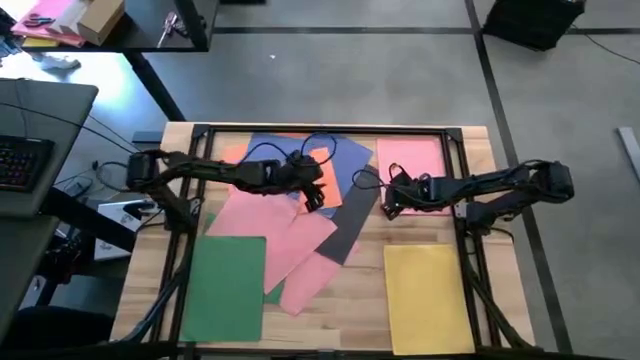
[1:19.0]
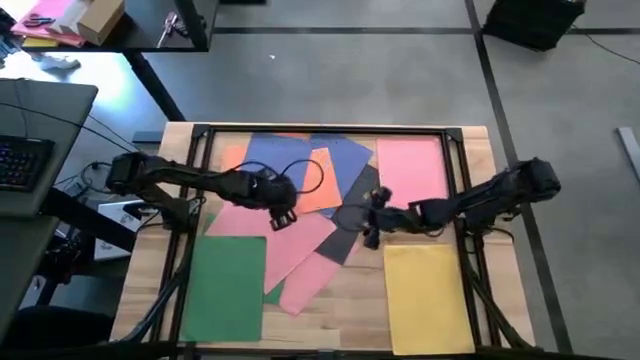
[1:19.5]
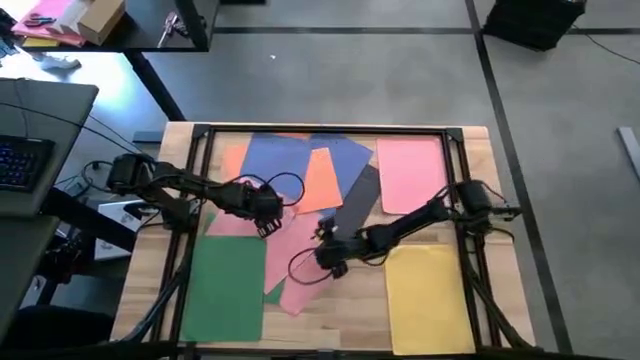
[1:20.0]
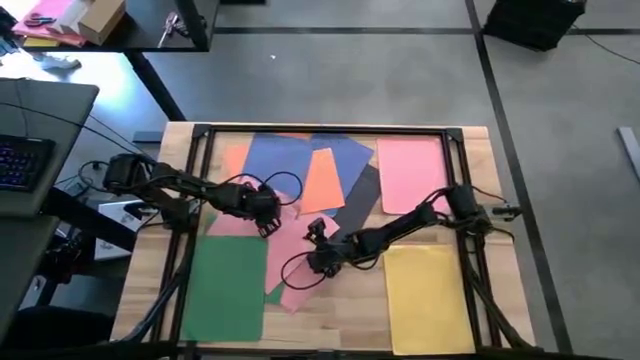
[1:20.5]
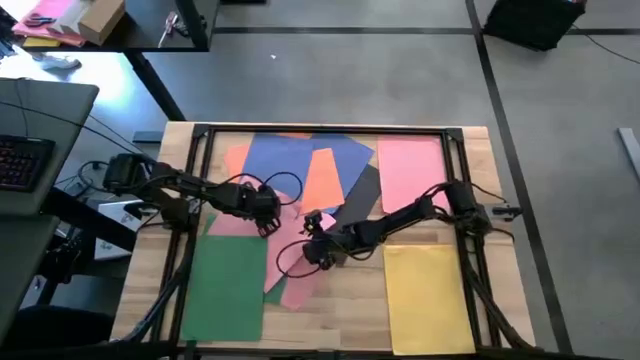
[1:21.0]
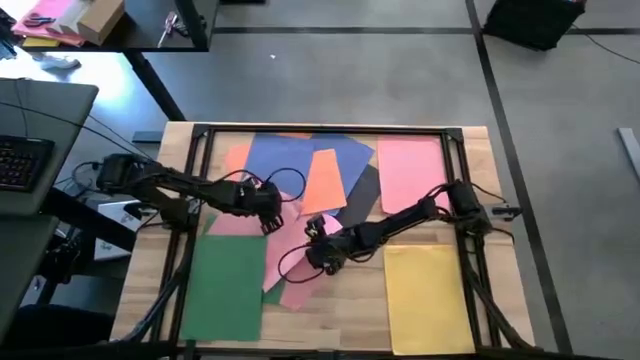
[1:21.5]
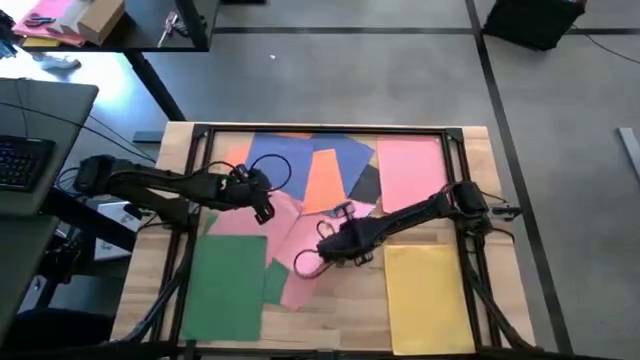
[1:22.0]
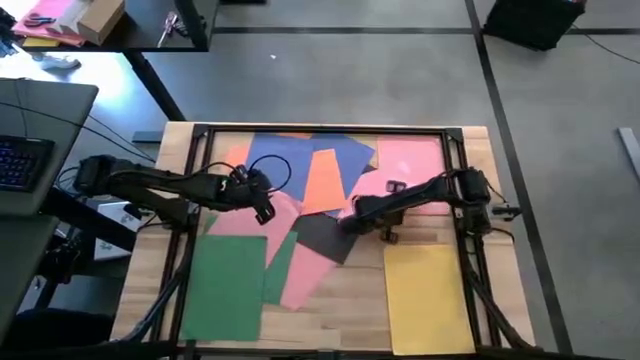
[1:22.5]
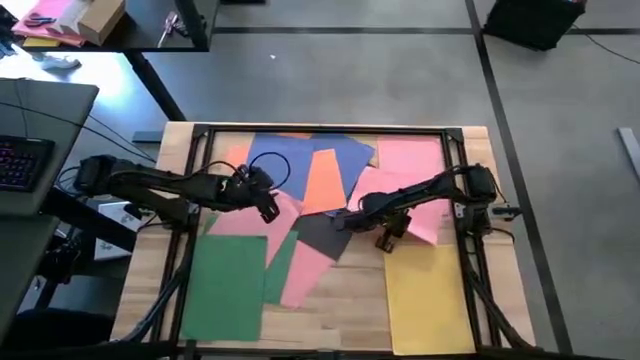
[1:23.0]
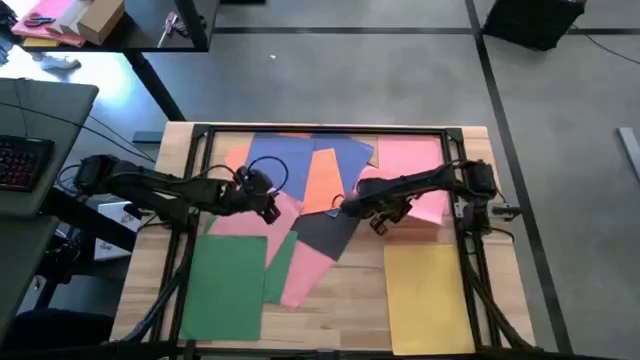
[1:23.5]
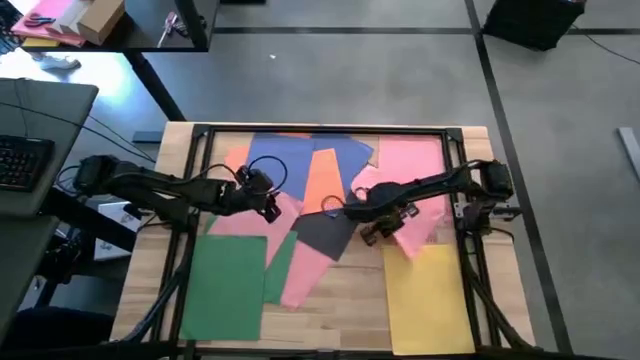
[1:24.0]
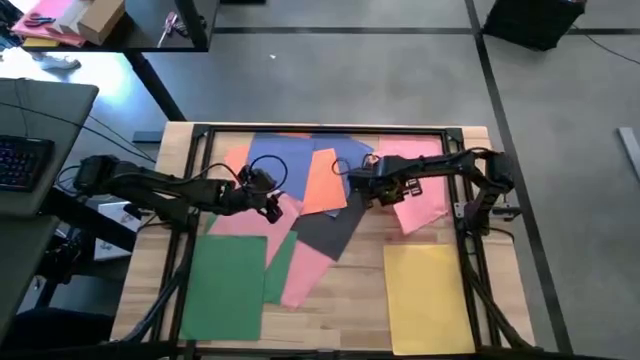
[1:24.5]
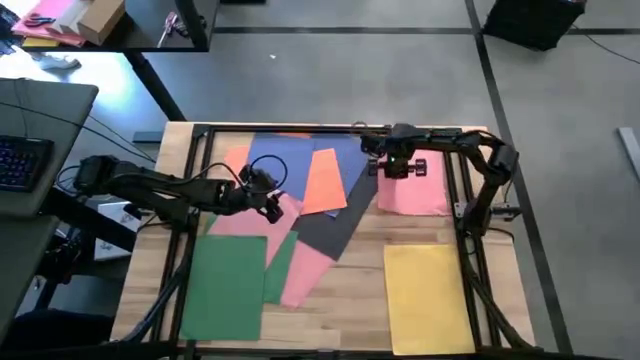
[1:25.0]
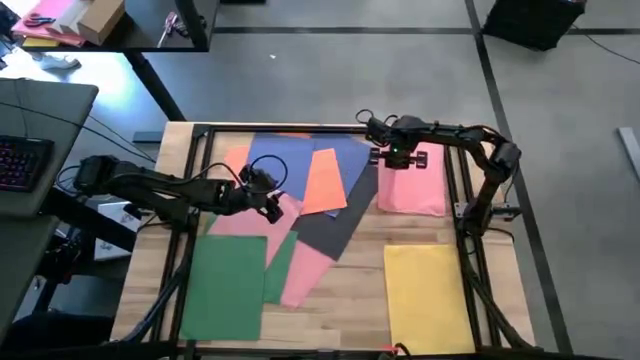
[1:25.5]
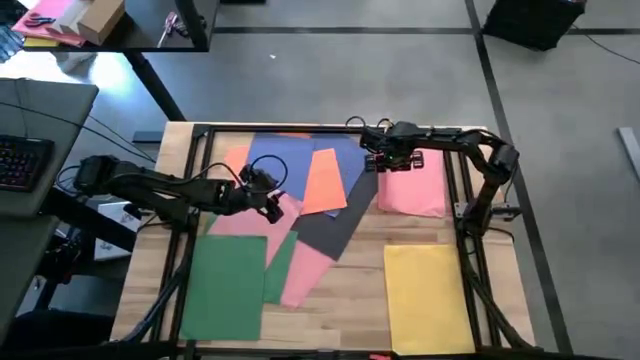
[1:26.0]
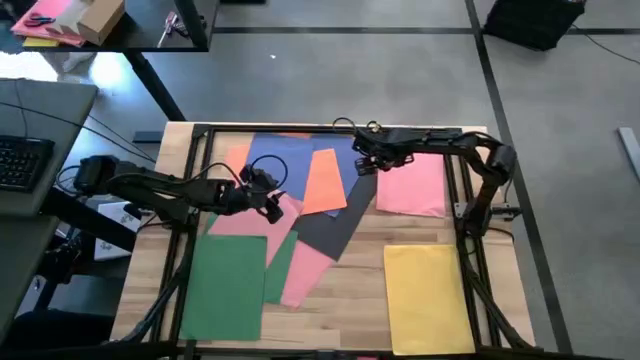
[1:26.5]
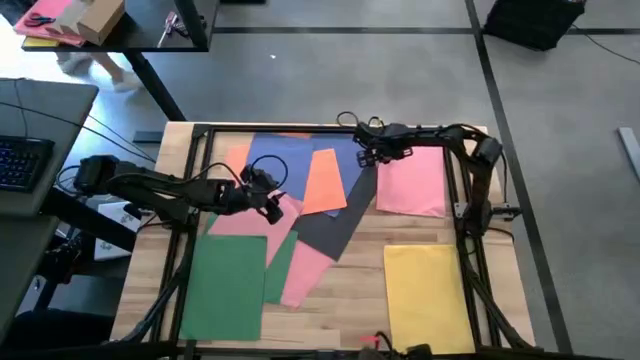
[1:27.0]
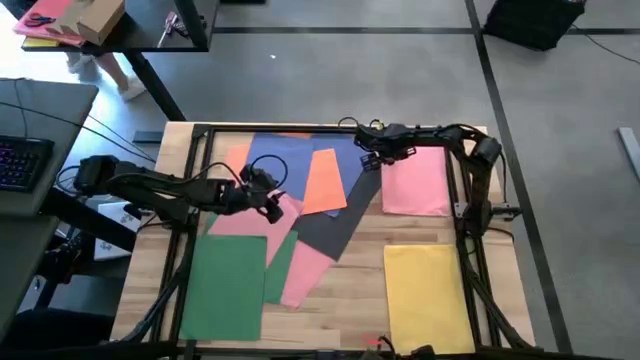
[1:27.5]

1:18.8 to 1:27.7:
Task: Organize paper
Stack the pink paper on top of the other pink paper to the top right of the table

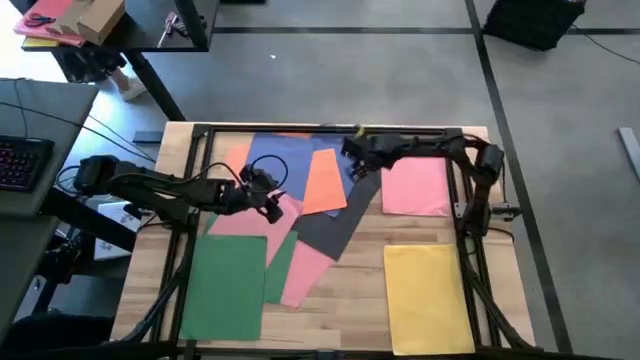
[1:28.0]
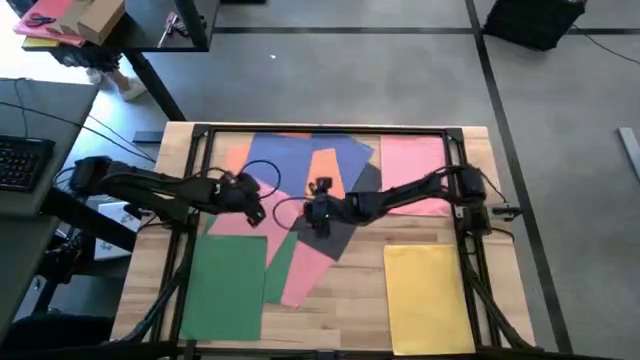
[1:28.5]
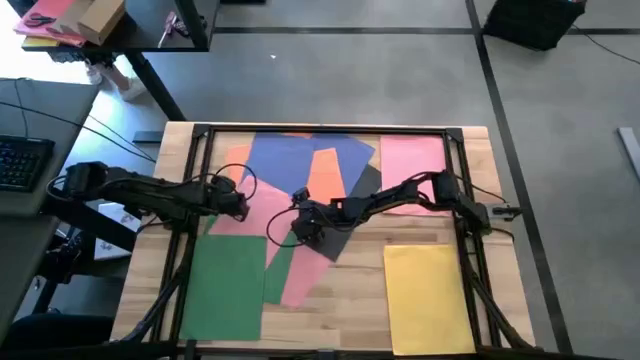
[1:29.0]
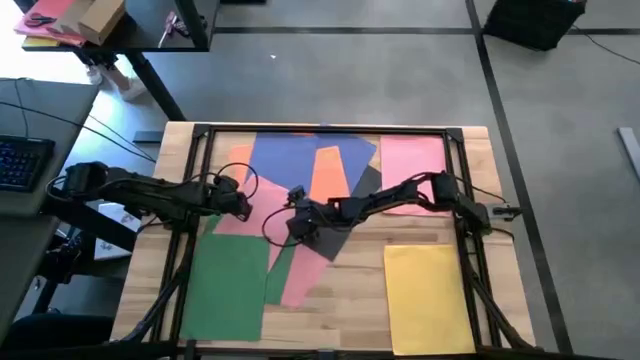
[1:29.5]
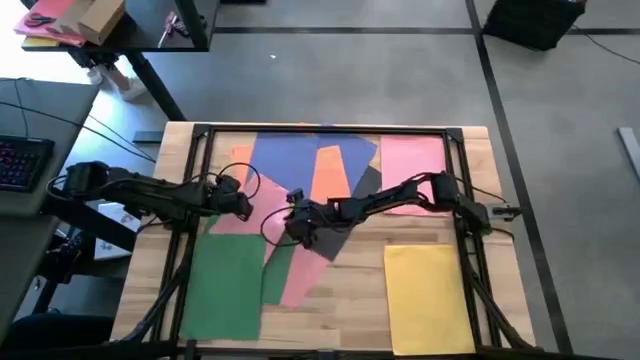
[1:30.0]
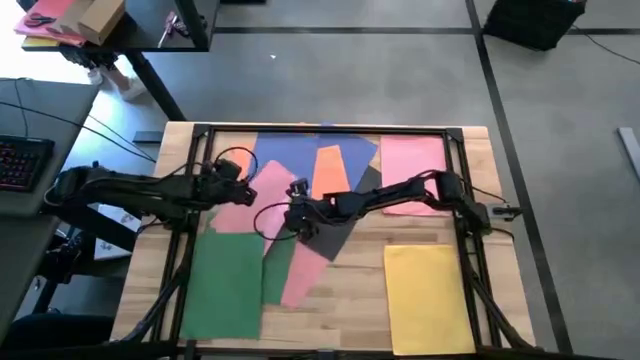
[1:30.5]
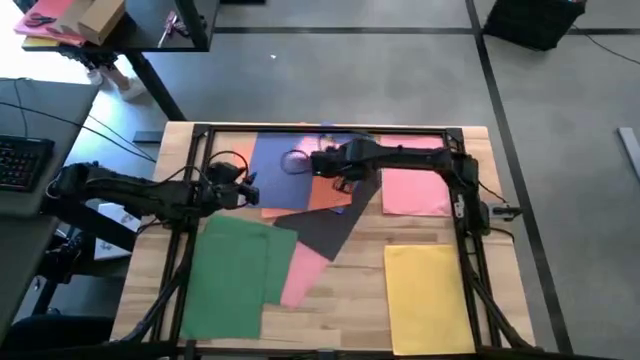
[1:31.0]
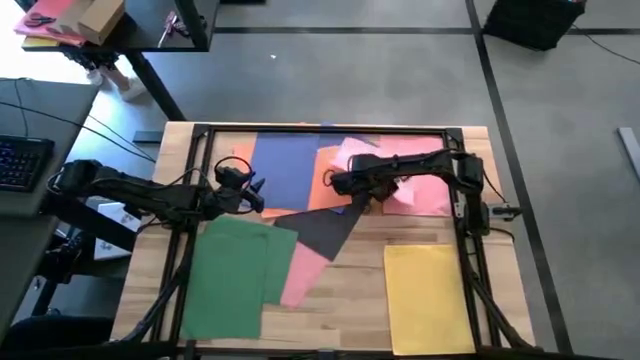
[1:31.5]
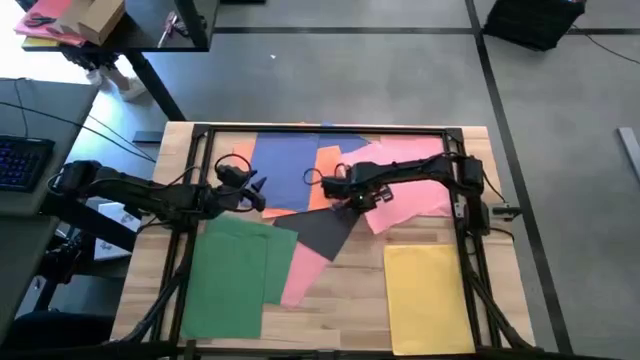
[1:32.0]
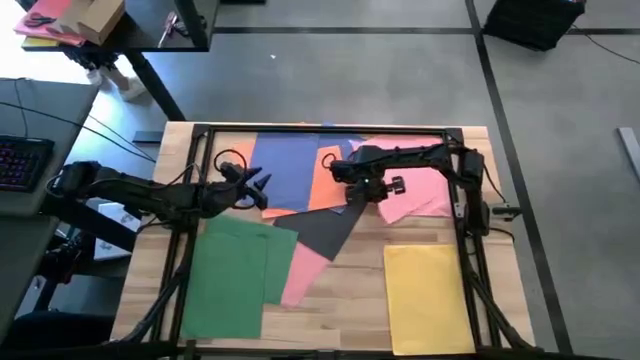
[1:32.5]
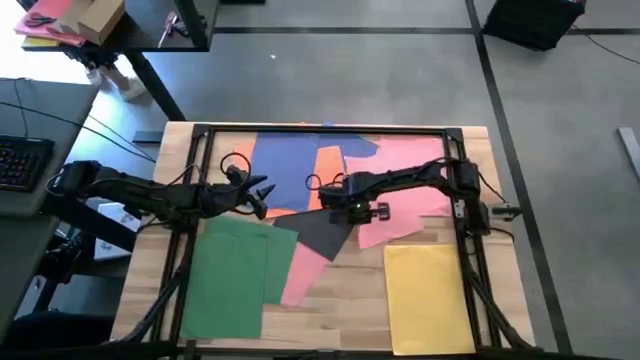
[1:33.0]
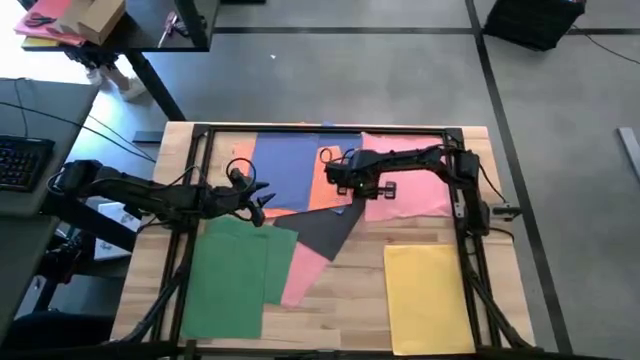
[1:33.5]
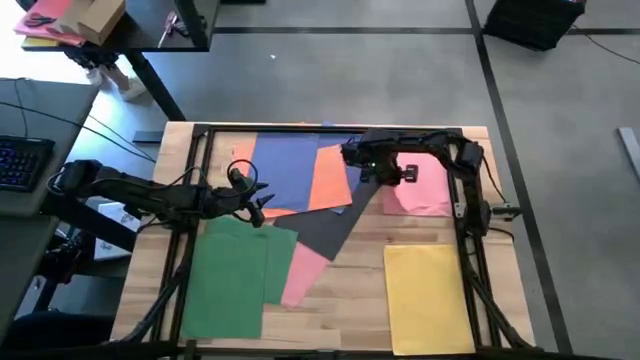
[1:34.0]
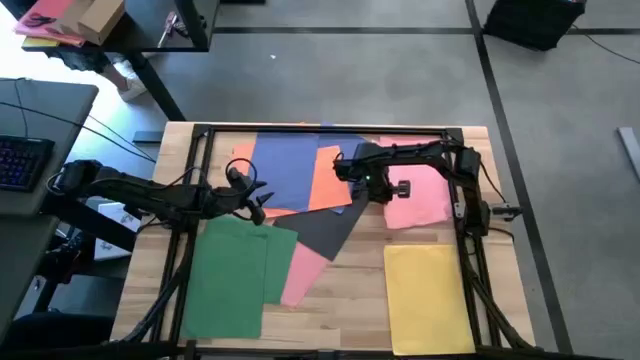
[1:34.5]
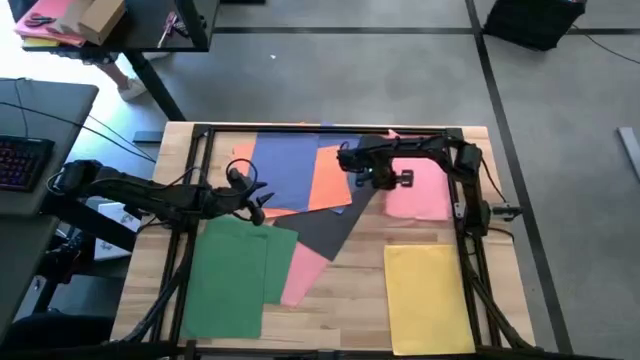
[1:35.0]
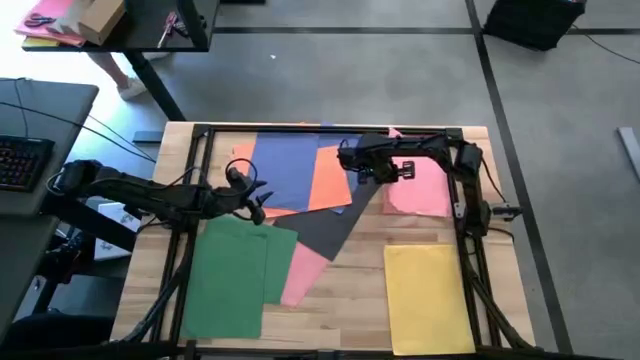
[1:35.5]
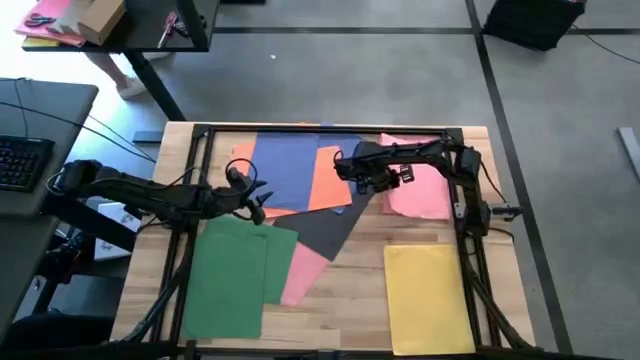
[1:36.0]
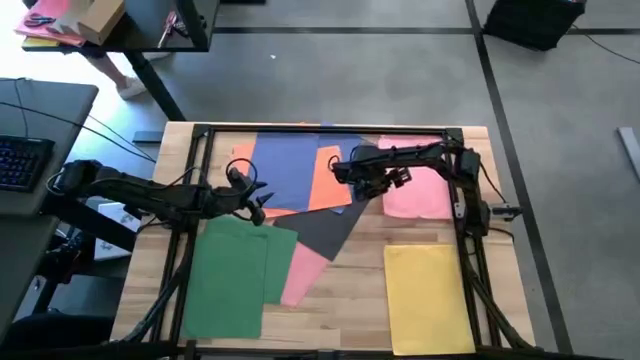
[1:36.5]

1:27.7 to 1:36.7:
Stack the pink paper on top of the other pink paper to the top right of the table

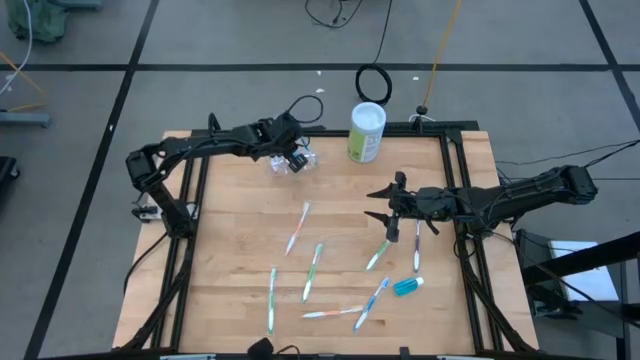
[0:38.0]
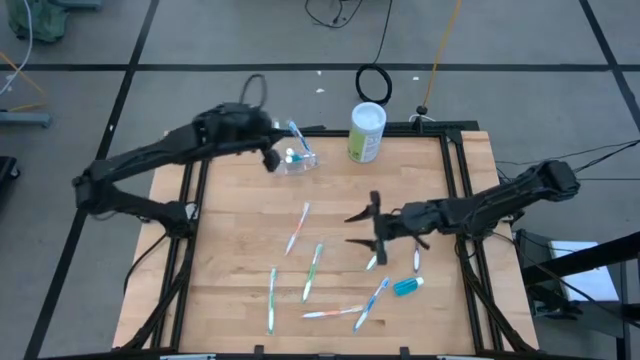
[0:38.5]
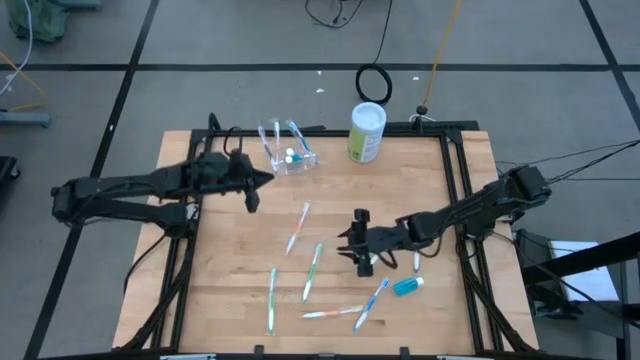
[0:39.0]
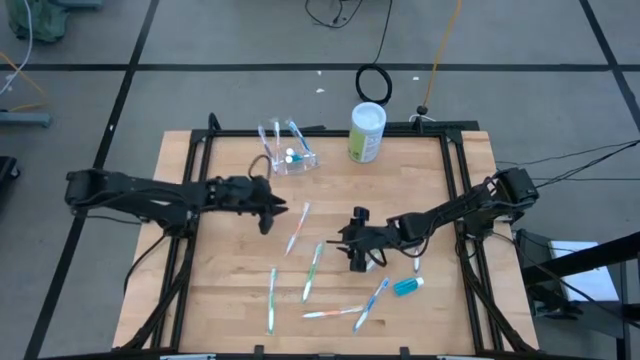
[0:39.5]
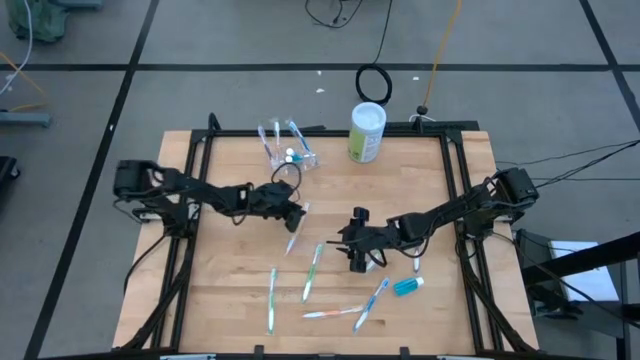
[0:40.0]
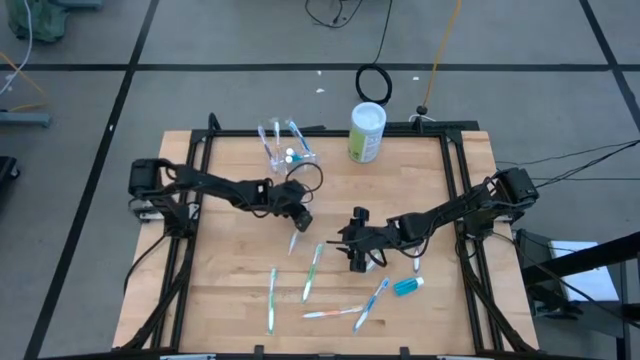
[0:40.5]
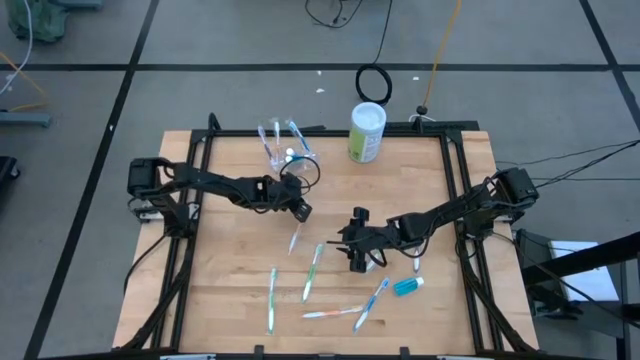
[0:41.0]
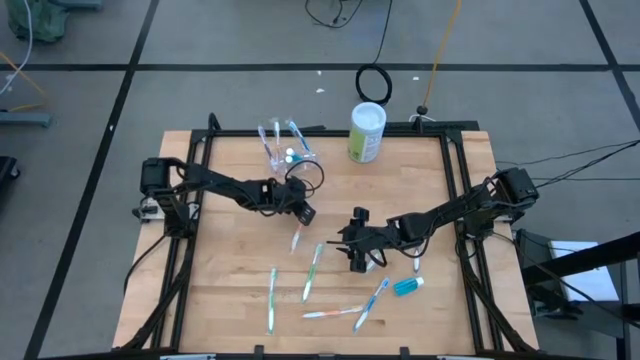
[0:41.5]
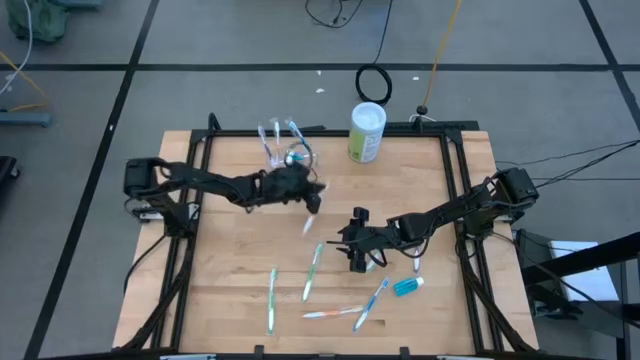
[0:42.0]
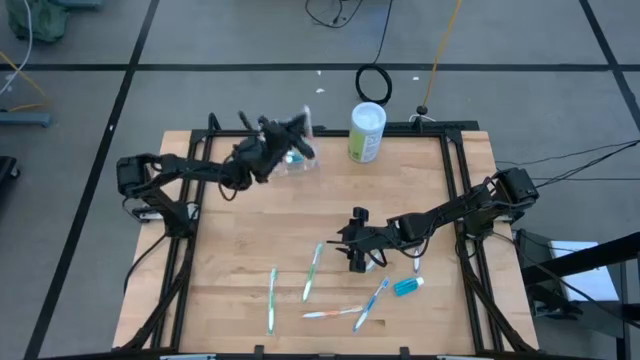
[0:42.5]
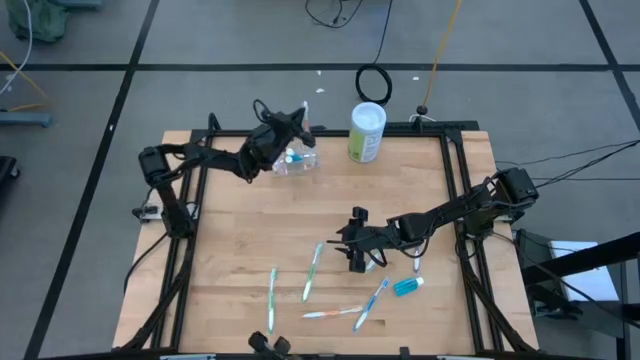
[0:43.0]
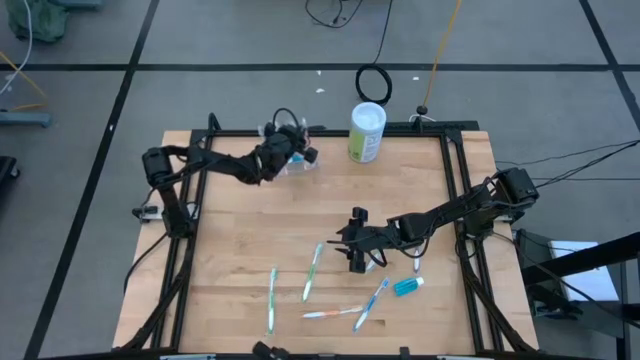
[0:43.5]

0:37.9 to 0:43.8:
Task: Pick & Place toothbrushing station
Put the top orange toothbrush into the transparent organizer
